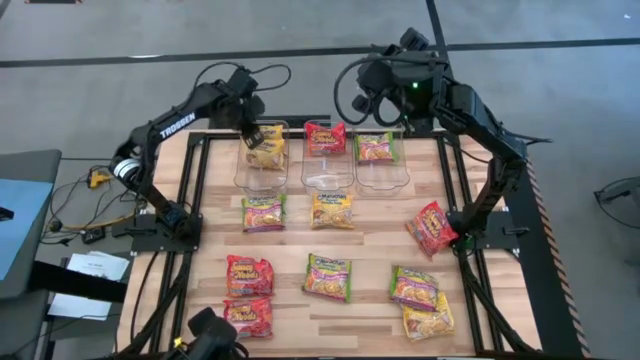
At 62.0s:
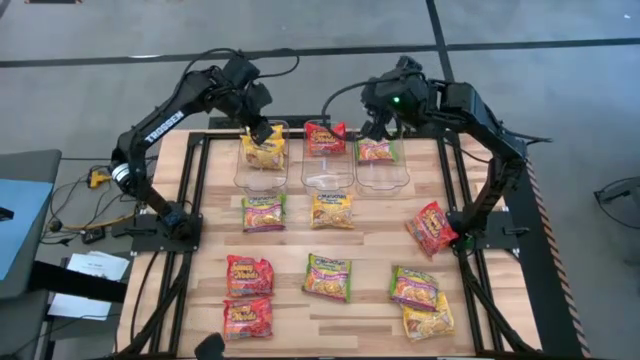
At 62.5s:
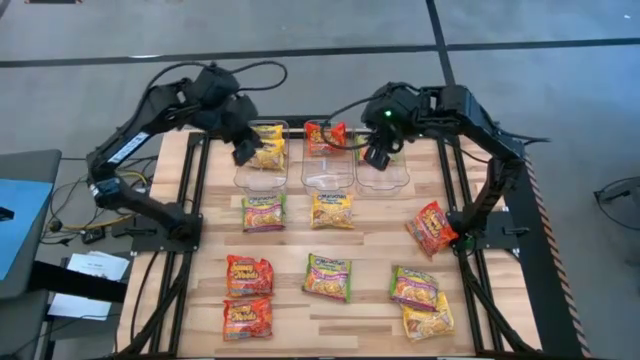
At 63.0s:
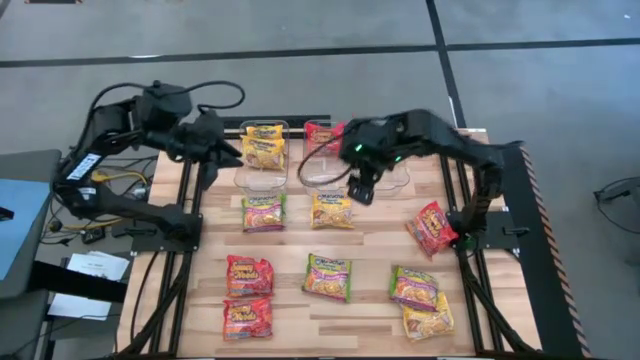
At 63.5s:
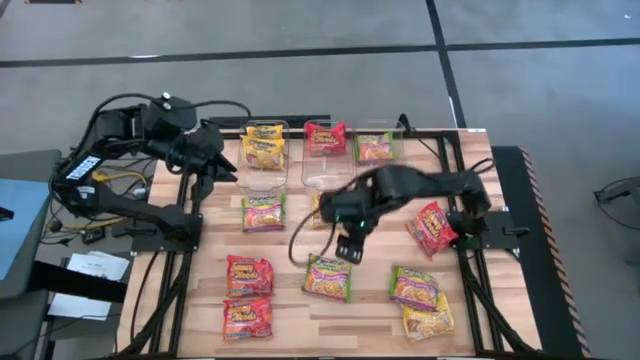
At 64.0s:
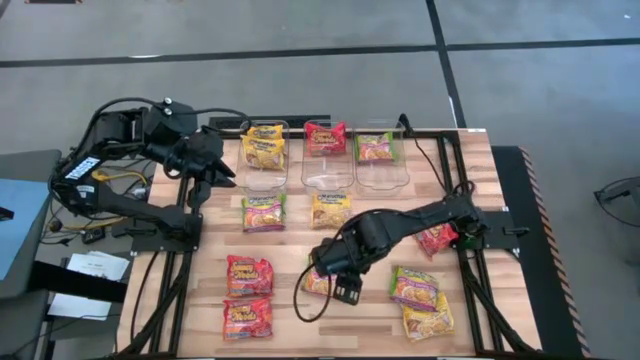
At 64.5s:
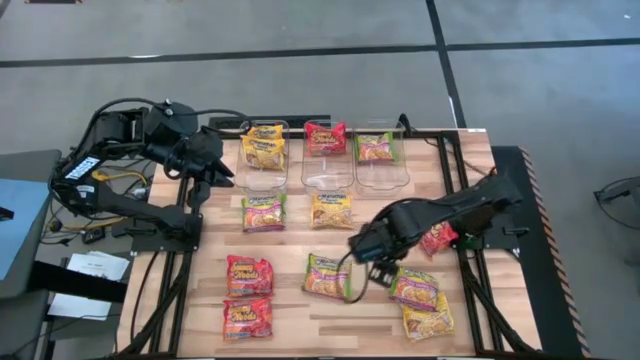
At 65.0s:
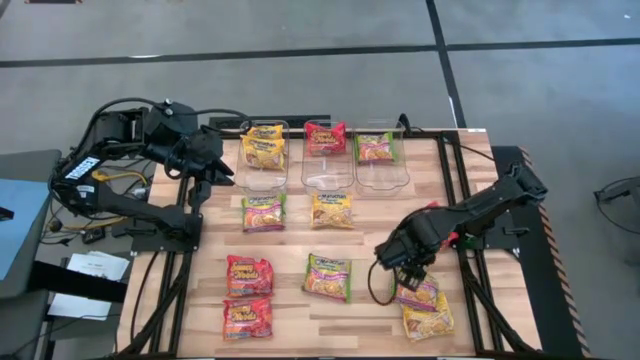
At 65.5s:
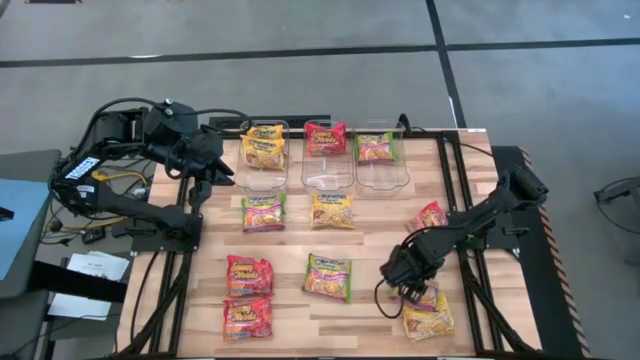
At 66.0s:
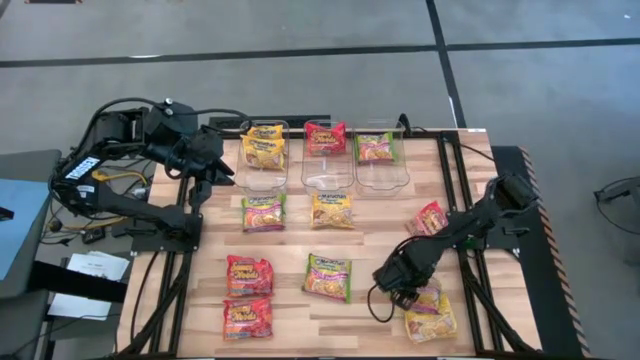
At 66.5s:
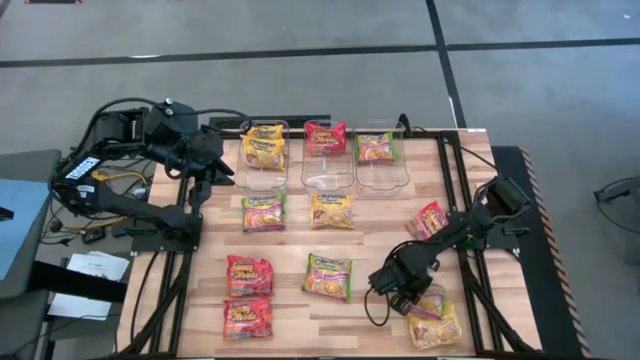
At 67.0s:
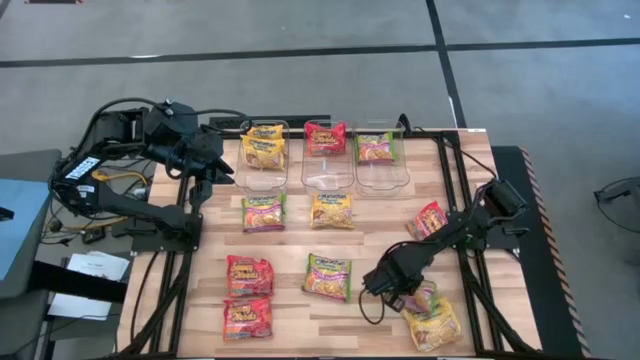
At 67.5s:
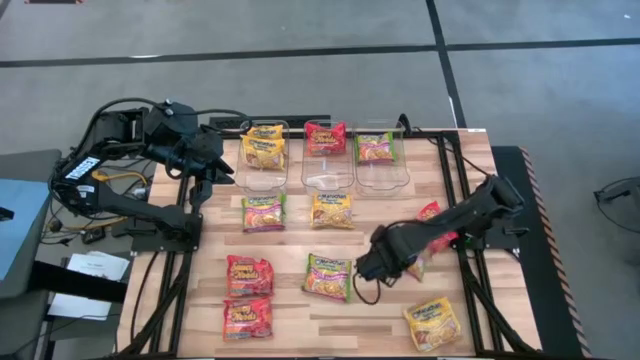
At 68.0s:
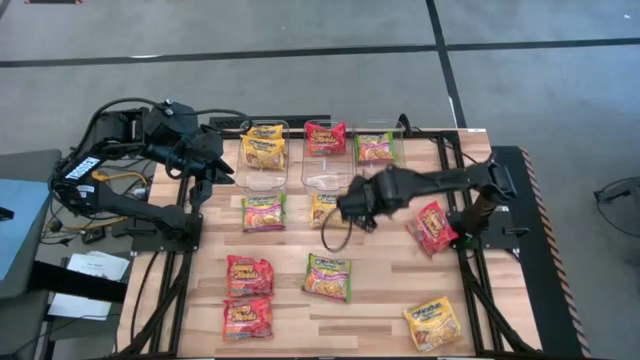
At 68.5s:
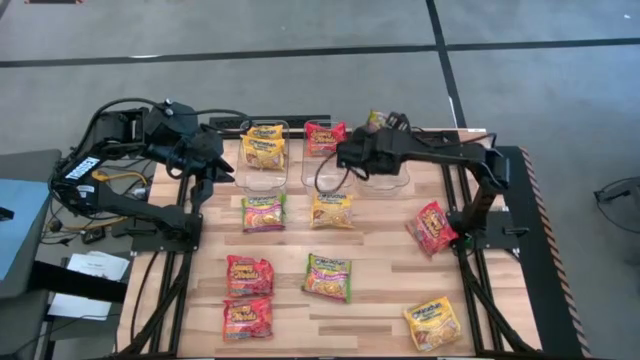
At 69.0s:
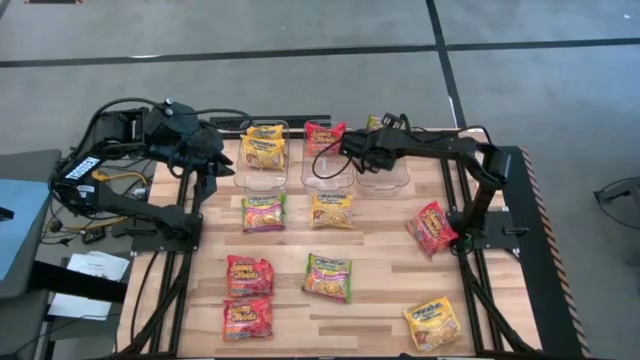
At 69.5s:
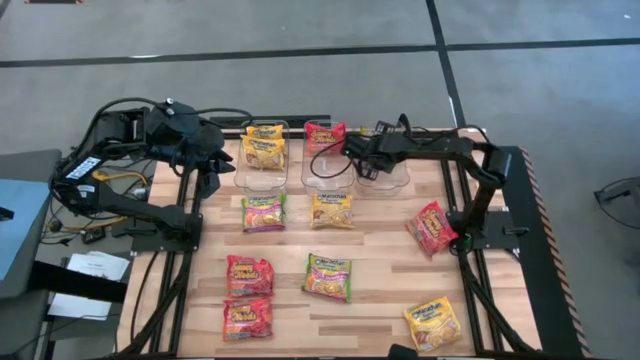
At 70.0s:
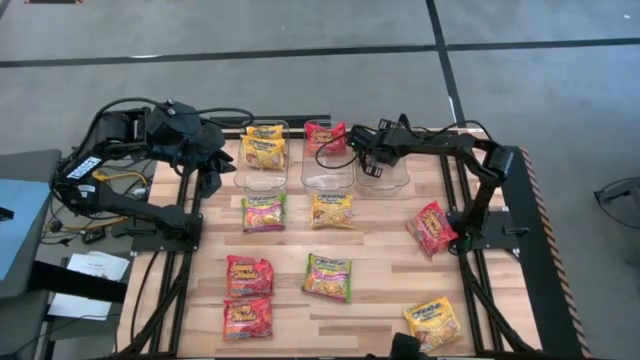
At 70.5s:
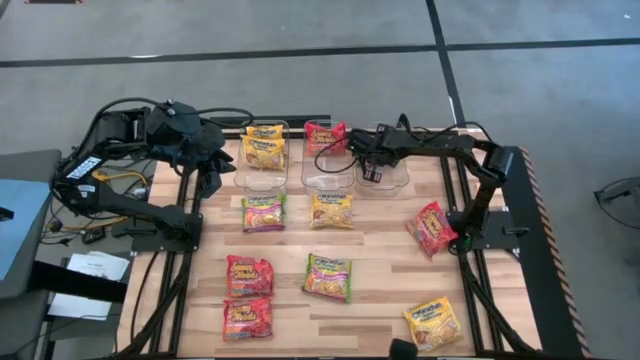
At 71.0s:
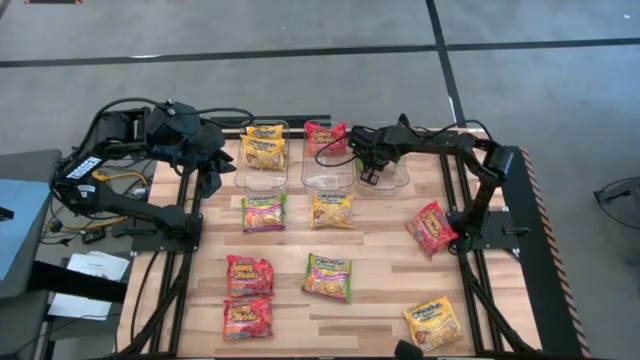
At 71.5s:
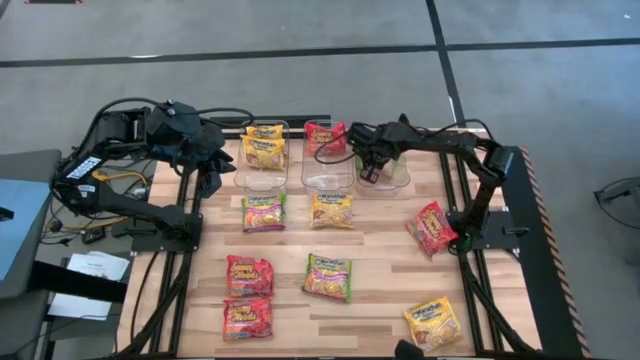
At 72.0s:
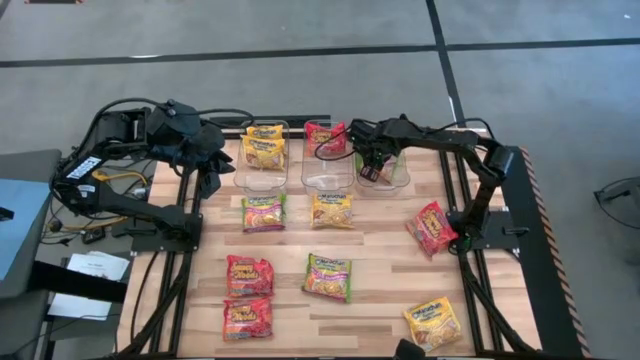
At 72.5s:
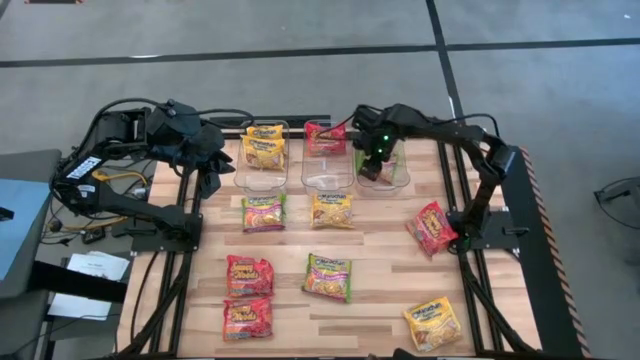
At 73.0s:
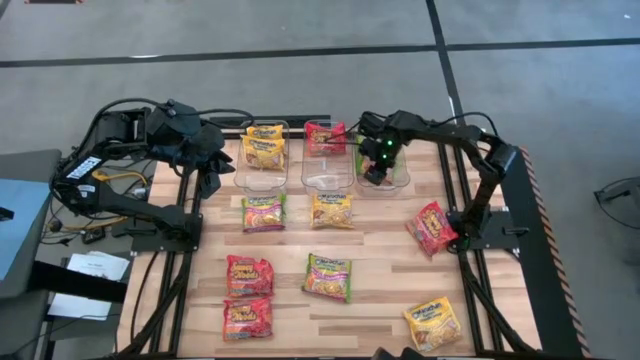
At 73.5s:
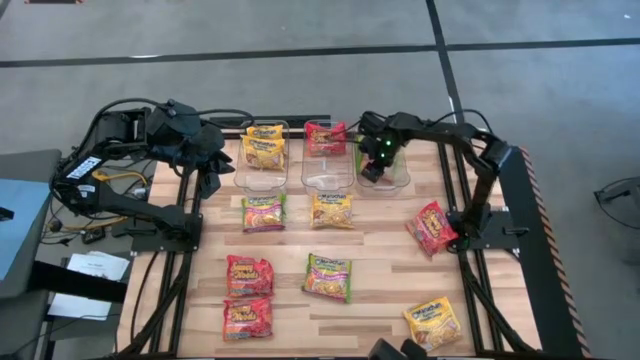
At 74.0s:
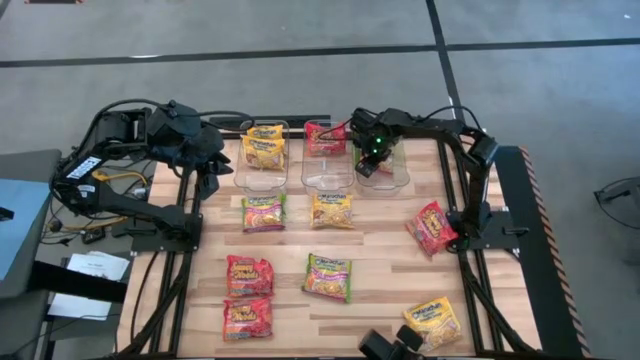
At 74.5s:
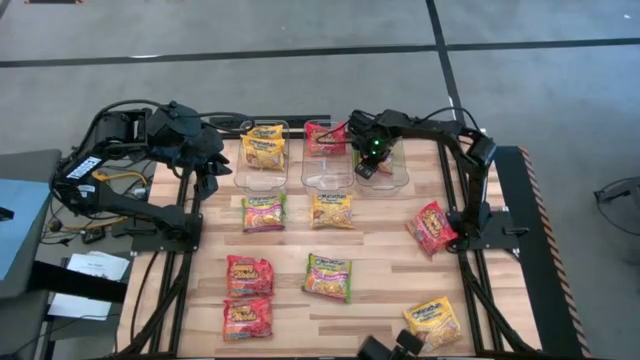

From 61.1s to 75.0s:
Task: Sort Maruchan noodles
Put the green noodle pack into the right transparent bin

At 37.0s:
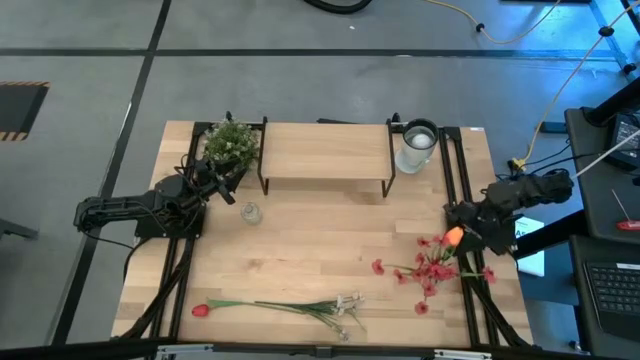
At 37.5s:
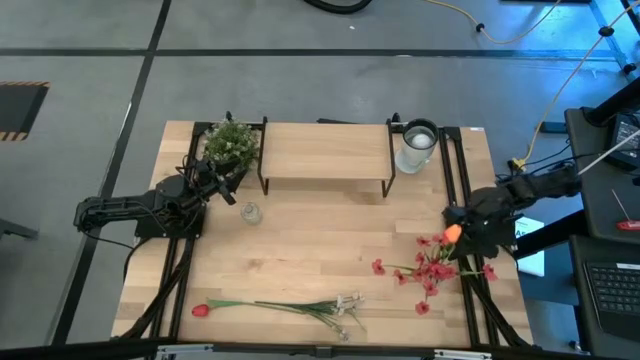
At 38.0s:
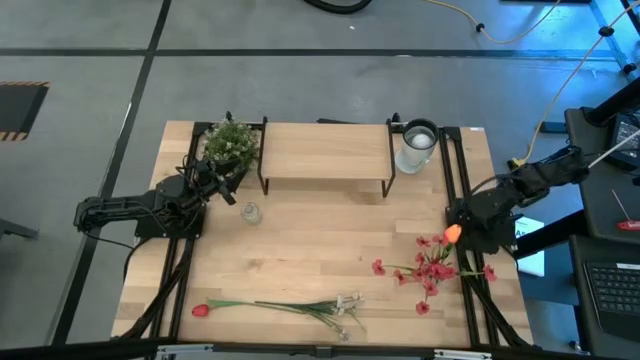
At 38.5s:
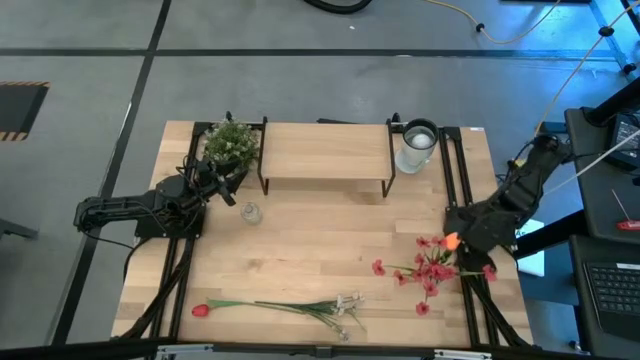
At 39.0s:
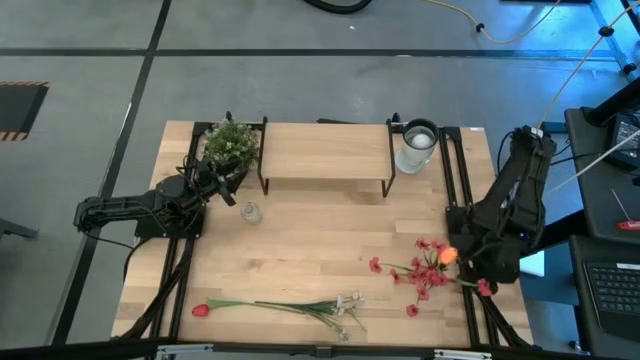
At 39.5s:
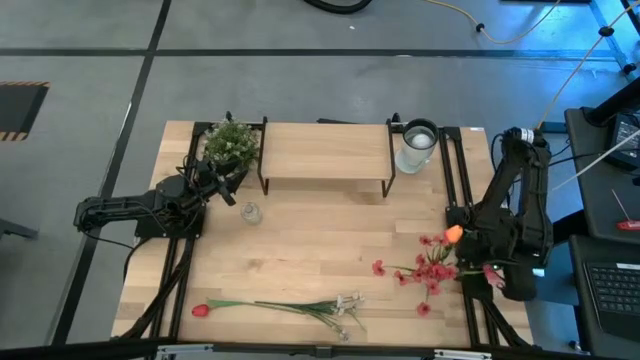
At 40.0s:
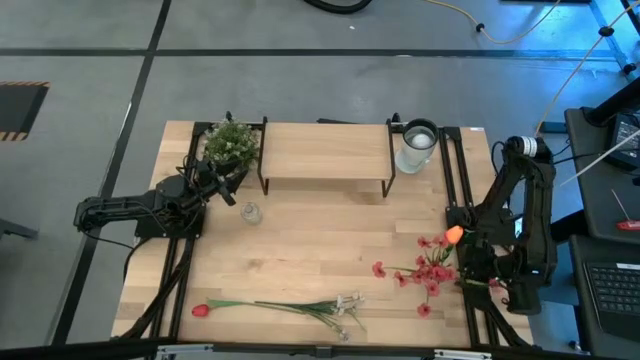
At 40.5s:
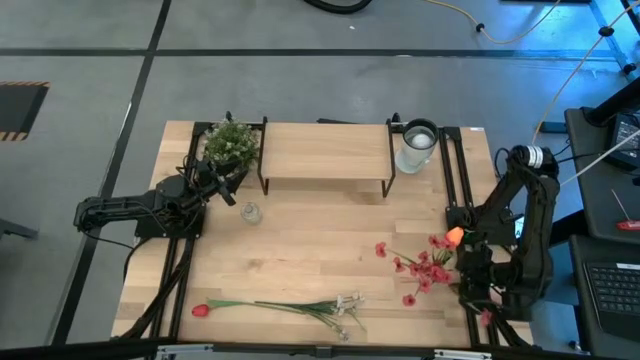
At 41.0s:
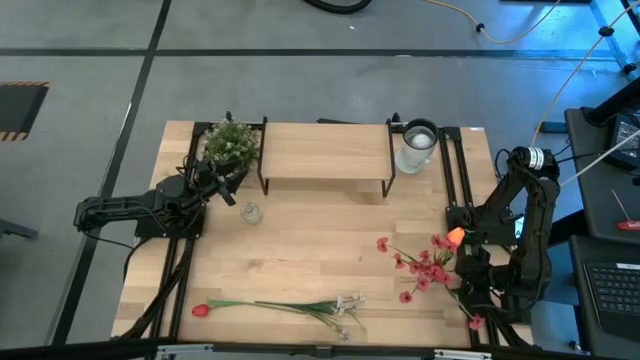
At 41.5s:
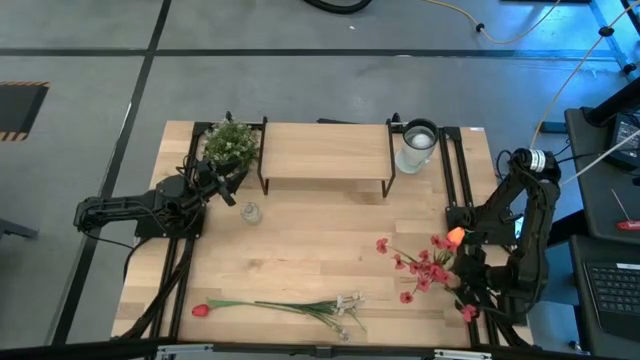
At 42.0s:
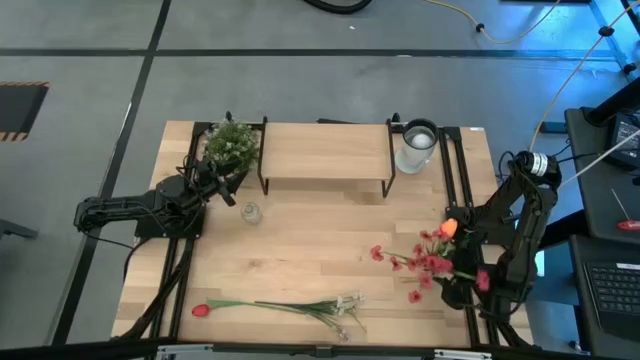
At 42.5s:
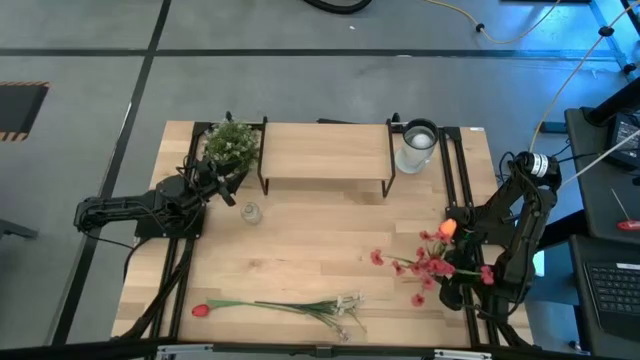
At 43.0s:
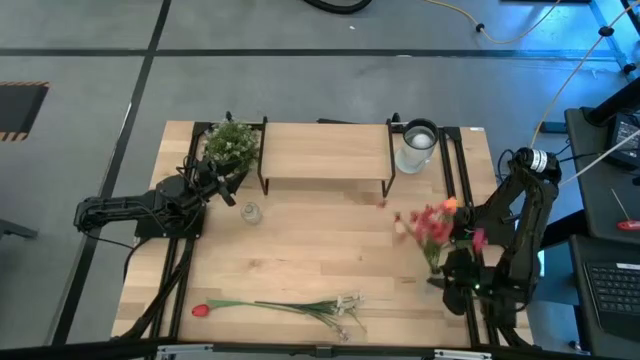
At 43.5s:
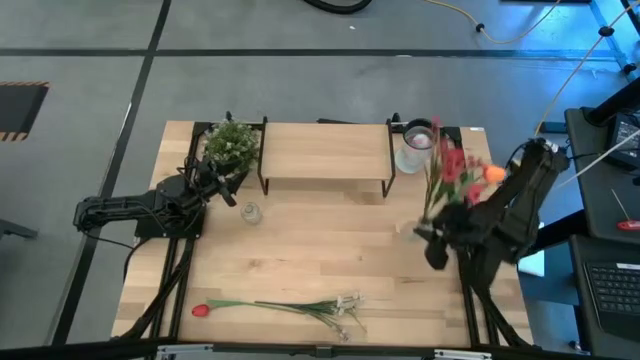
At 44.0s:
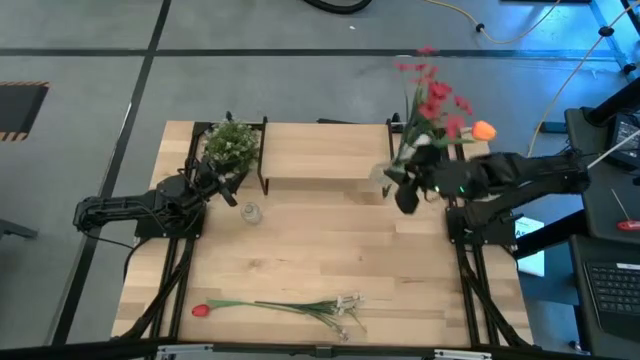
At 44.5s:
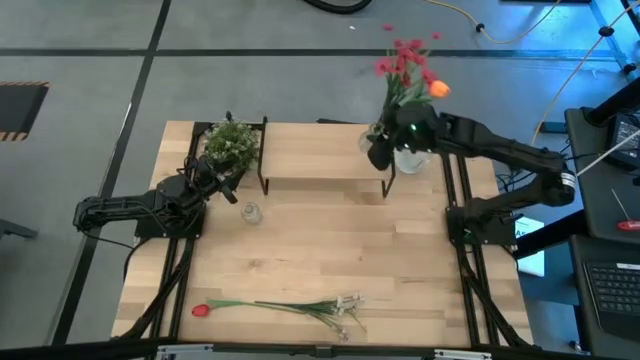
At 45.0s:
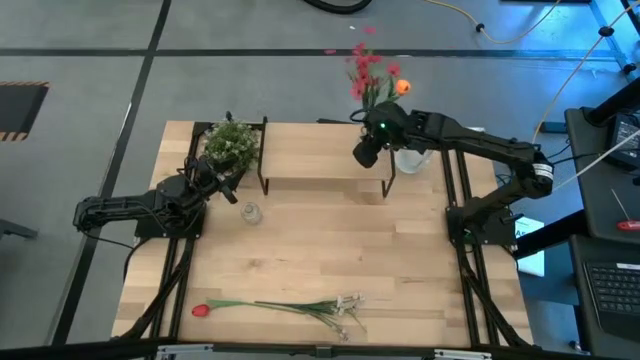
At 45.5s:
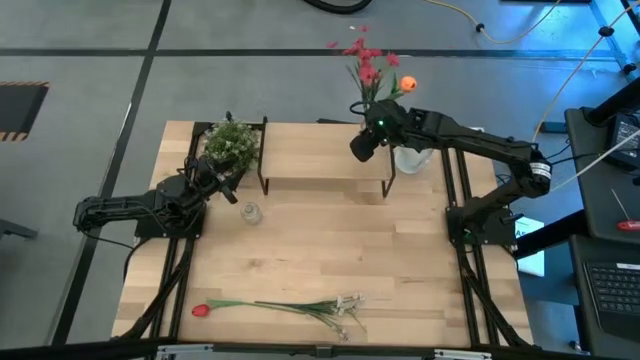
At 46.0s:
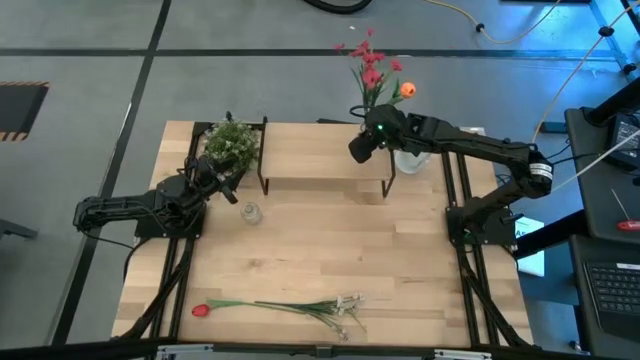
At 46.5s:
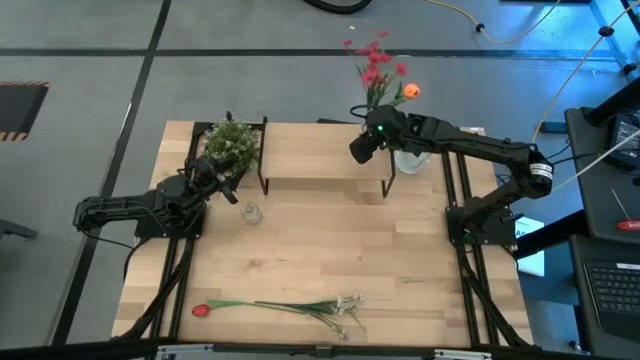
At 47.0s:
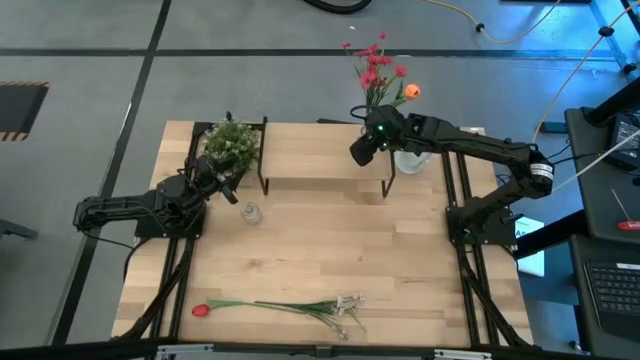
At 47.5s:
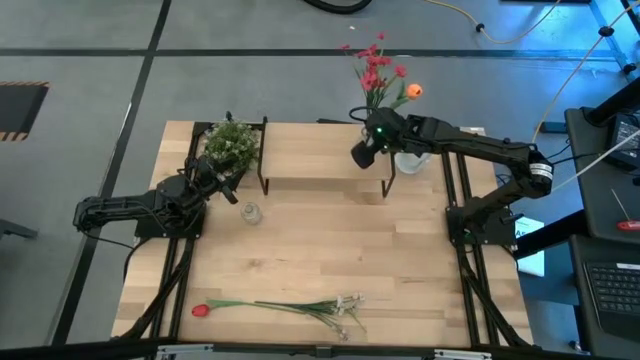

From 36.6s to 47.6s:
Task: Pick and place flowers into a vace then onto a shelf
Put the bottom transparent flower vase on the shelf
